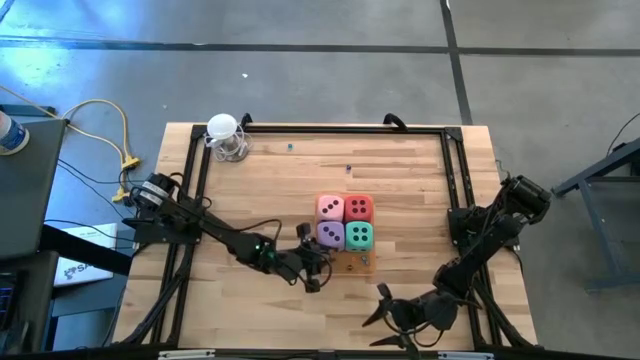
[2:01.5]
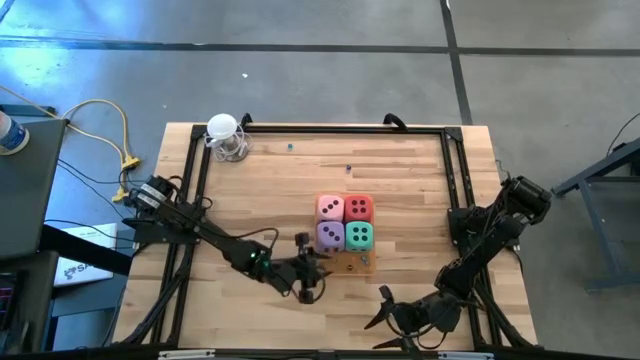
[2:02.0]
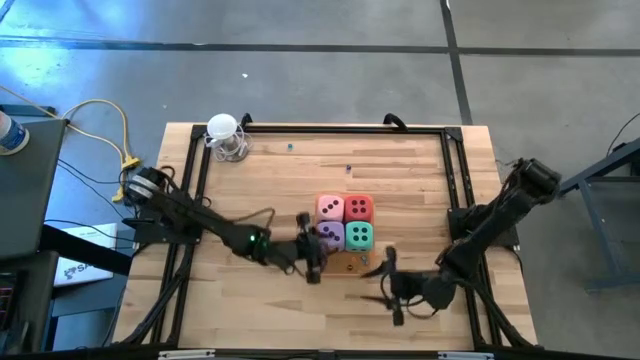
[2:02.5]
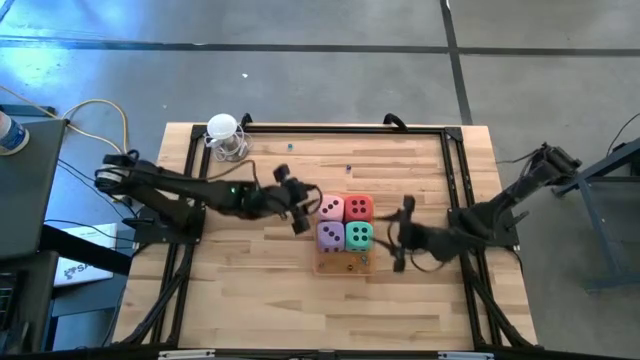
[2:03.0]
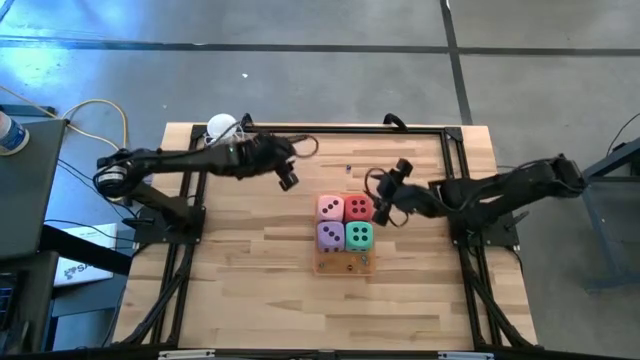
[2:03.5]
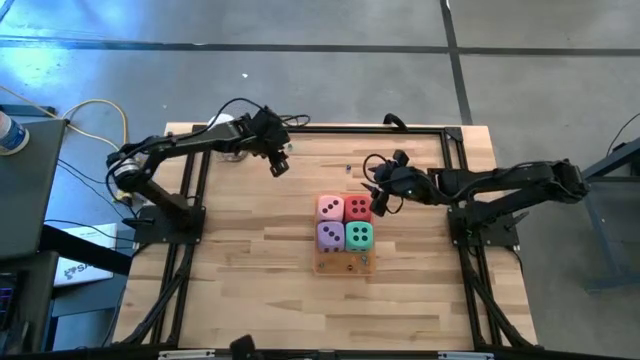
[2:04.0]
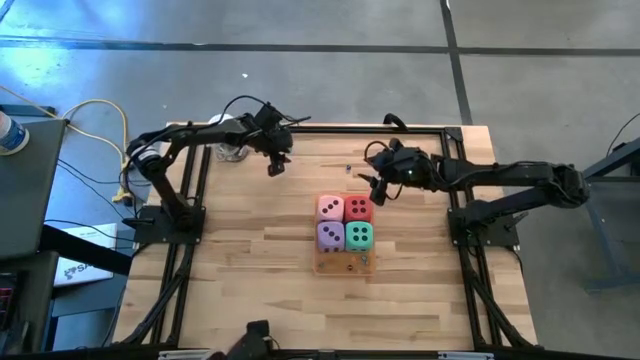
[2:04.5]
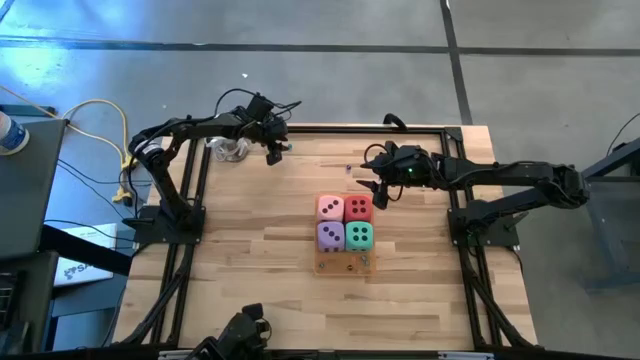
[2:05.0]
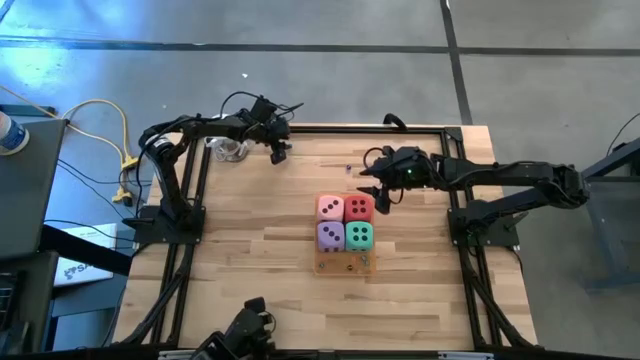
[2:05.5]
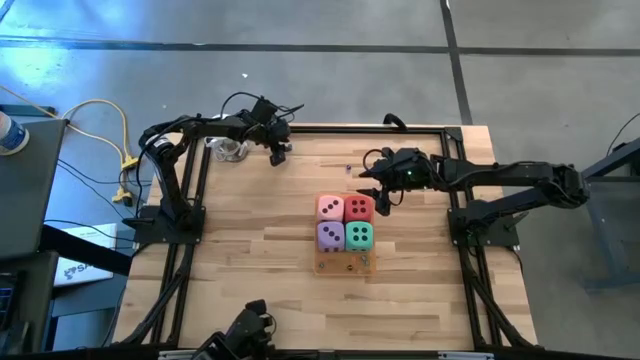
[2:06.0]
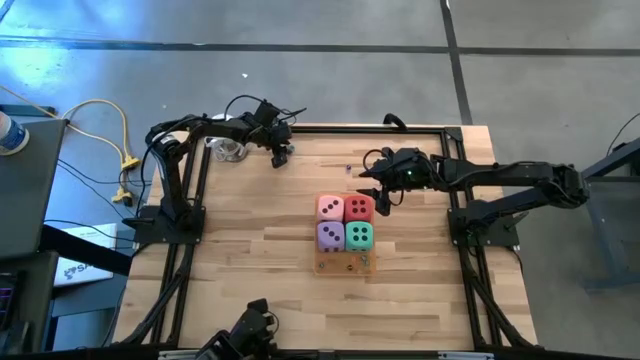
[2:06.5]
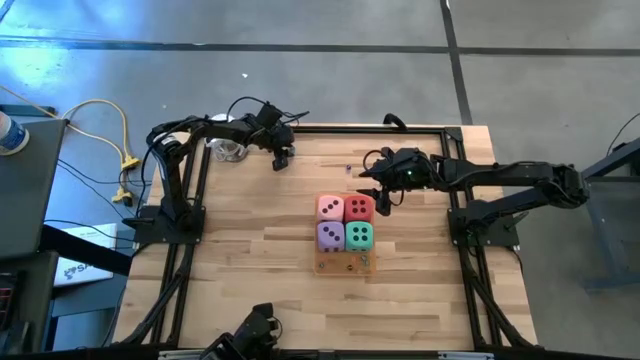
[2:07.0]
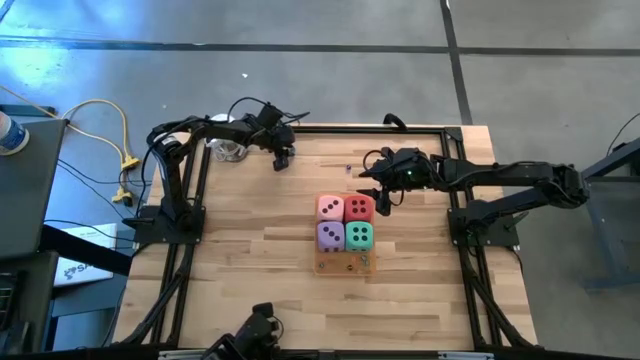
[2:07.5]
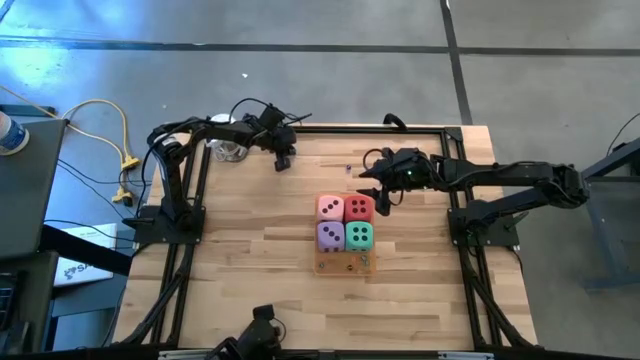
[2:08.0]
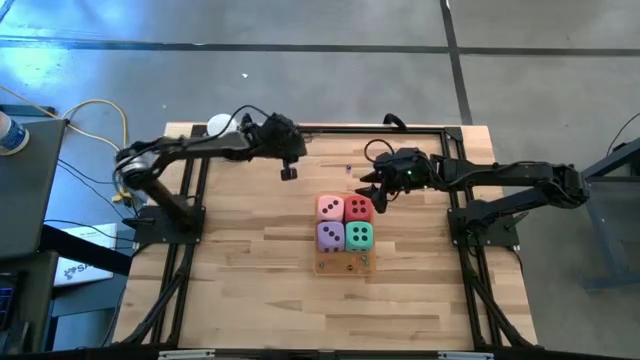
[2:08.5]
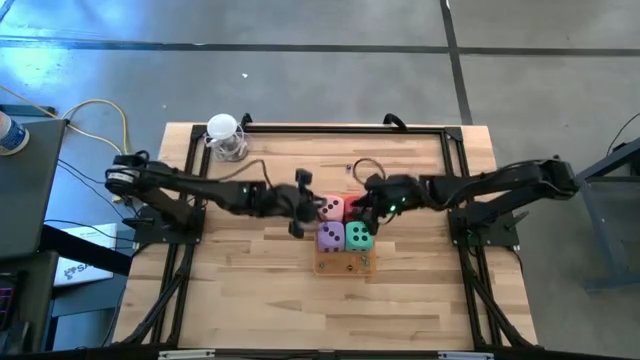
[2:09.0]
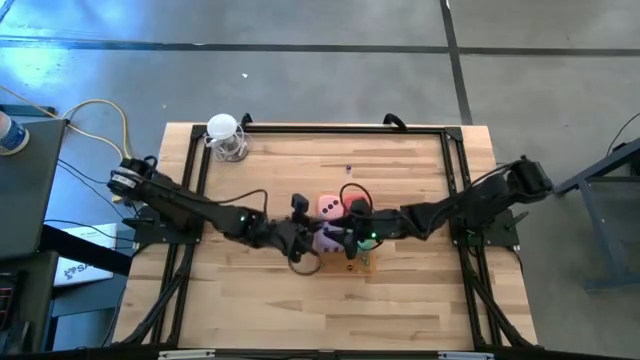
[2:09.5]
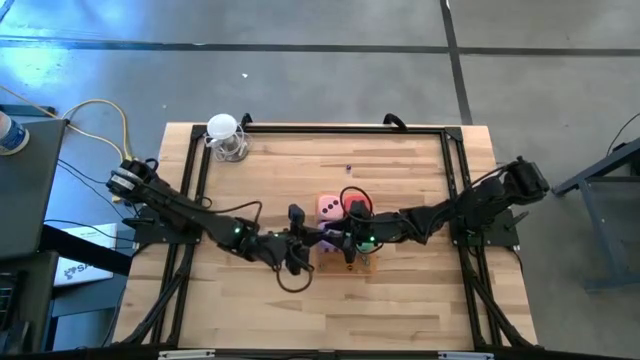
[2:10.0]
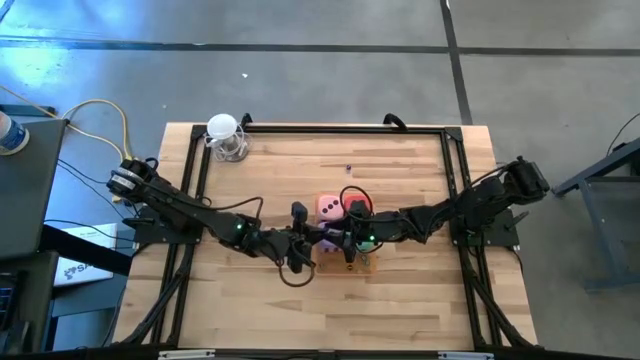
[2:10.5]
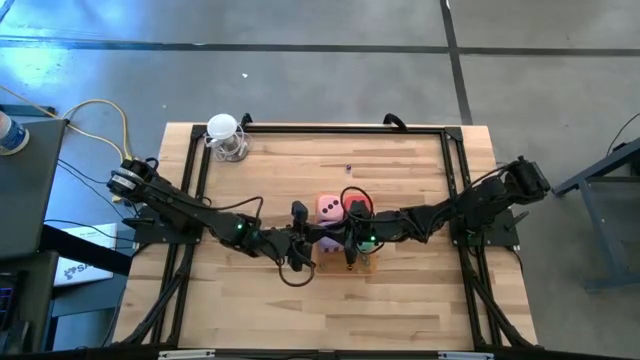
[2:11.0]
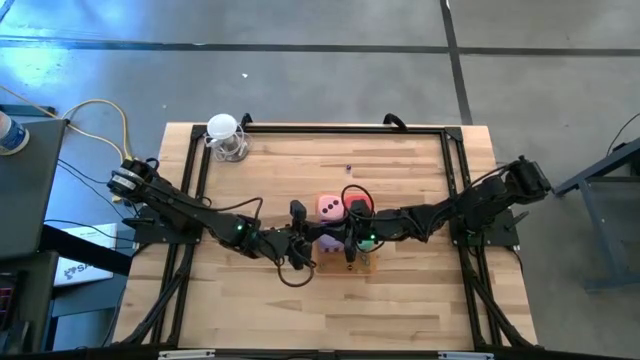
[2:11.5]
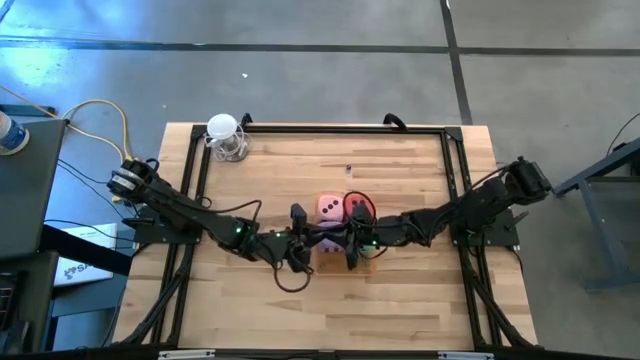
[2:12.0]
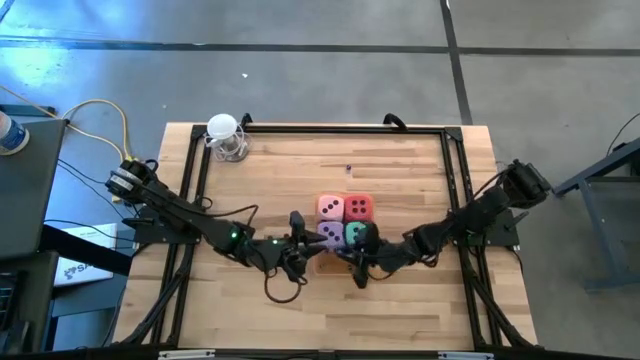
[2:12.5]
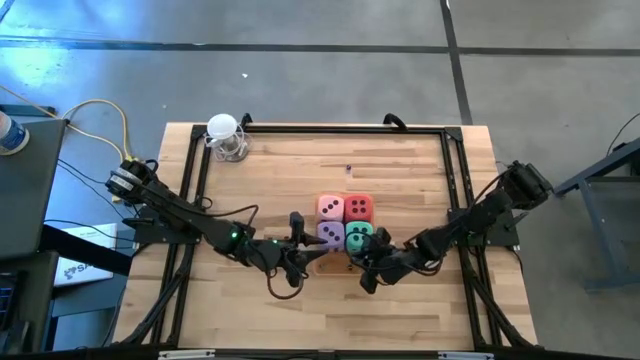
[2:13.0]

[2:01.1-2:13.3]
Task: Pick & Place Dice
Put the small blue die into the orange bin

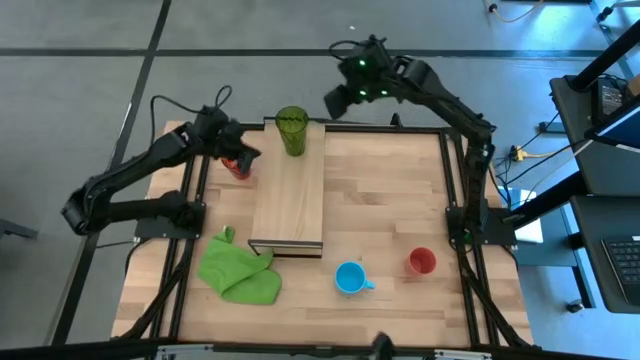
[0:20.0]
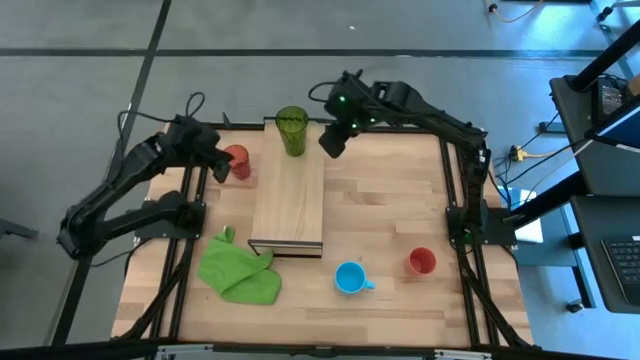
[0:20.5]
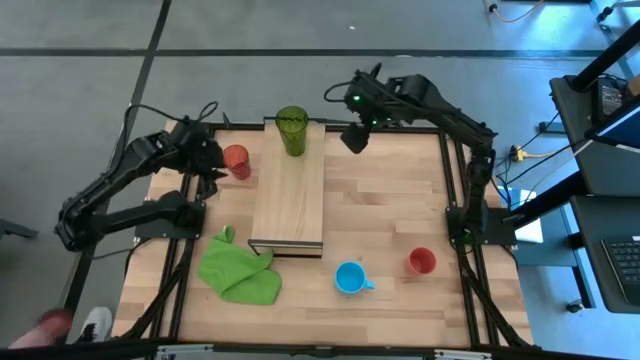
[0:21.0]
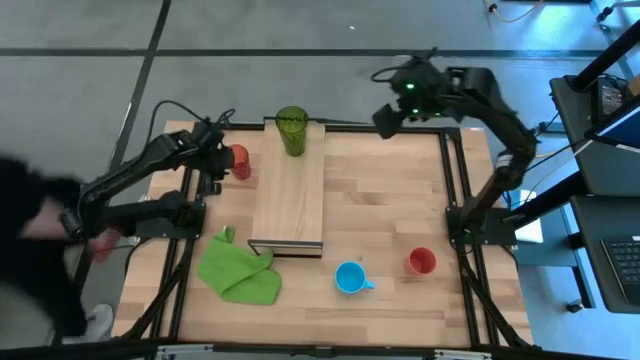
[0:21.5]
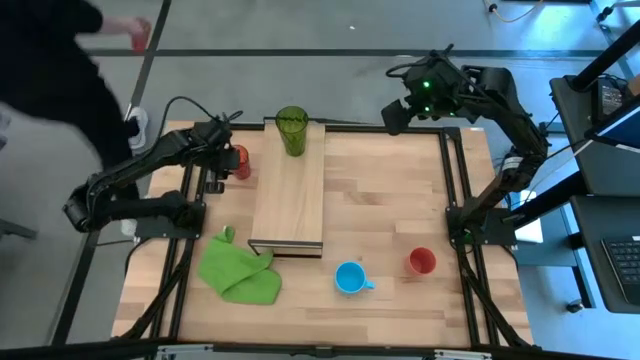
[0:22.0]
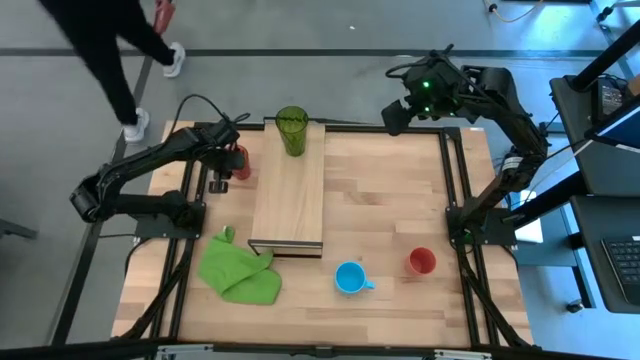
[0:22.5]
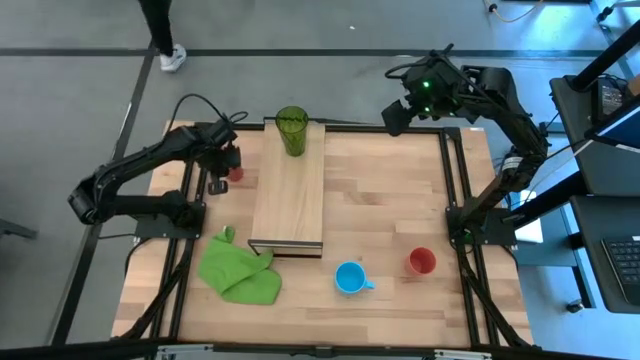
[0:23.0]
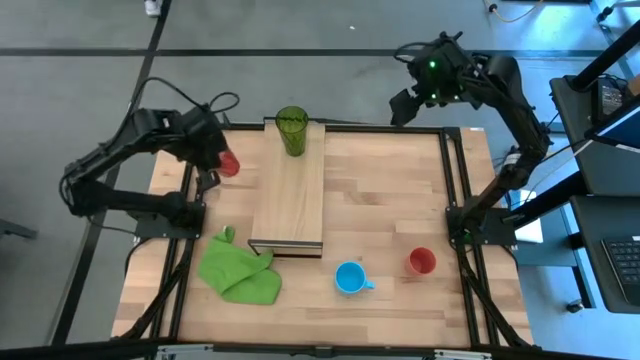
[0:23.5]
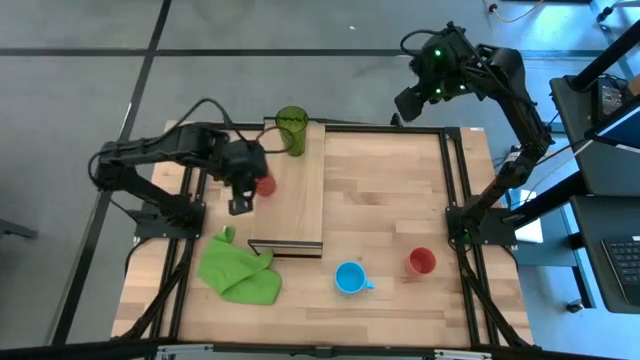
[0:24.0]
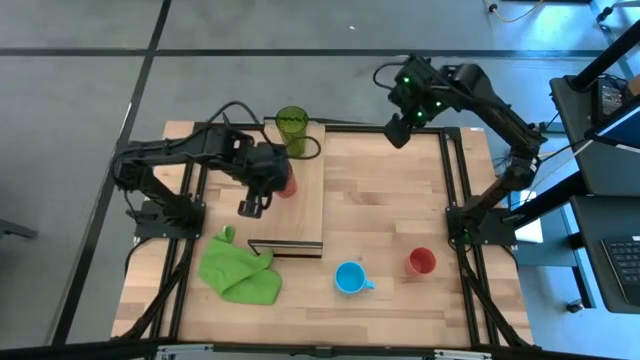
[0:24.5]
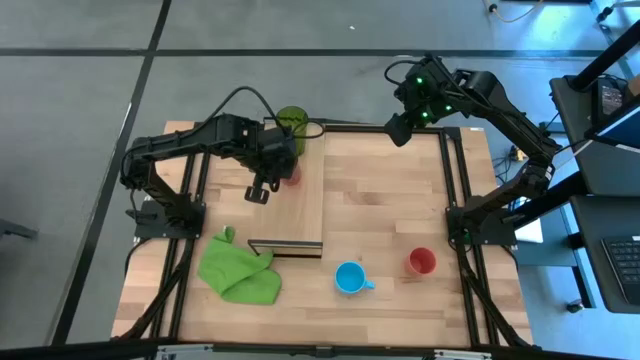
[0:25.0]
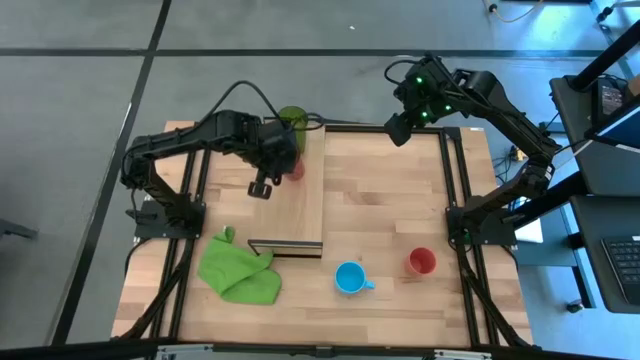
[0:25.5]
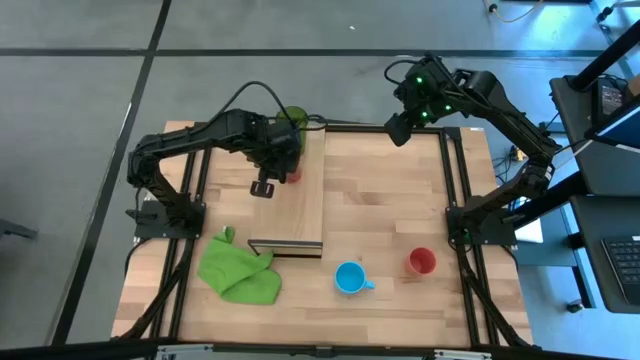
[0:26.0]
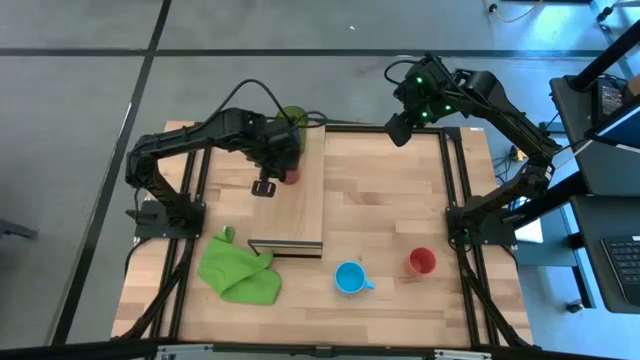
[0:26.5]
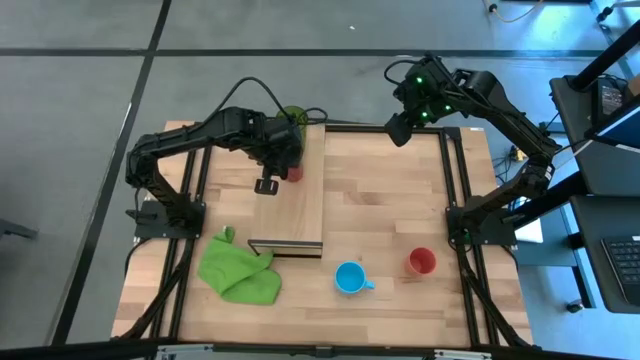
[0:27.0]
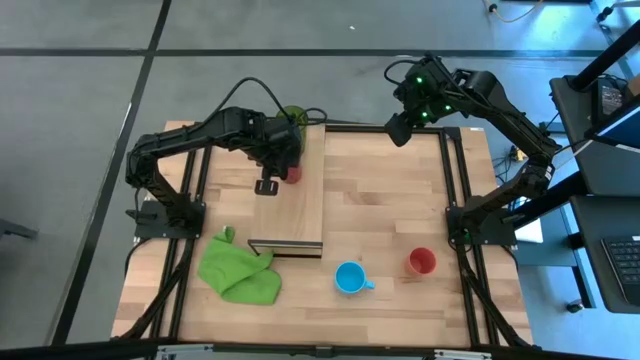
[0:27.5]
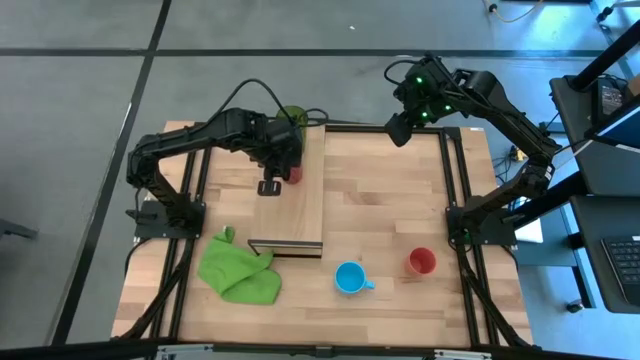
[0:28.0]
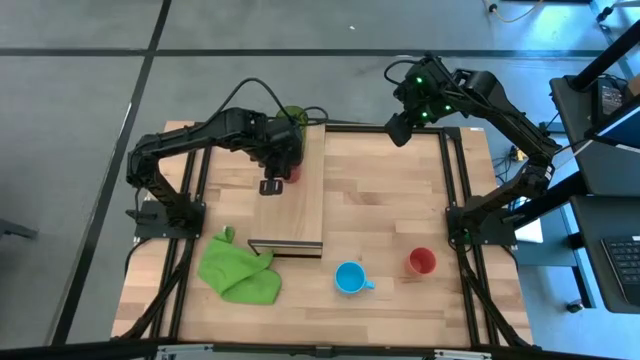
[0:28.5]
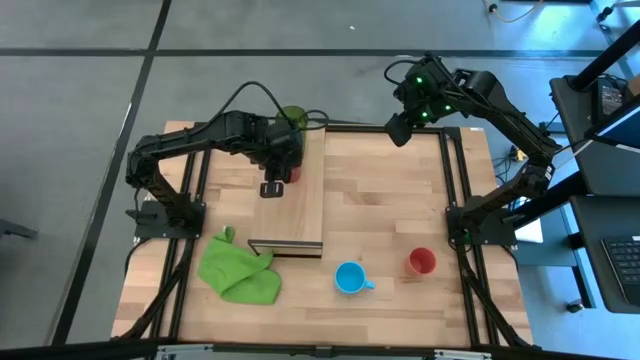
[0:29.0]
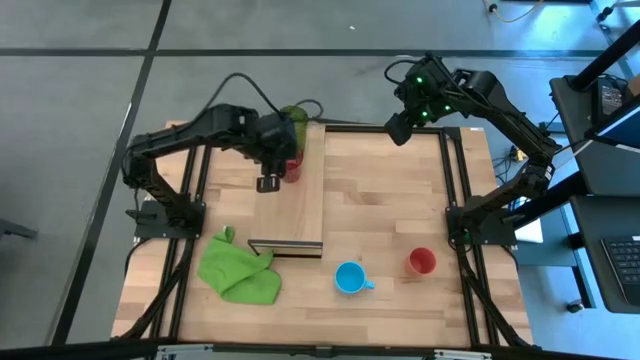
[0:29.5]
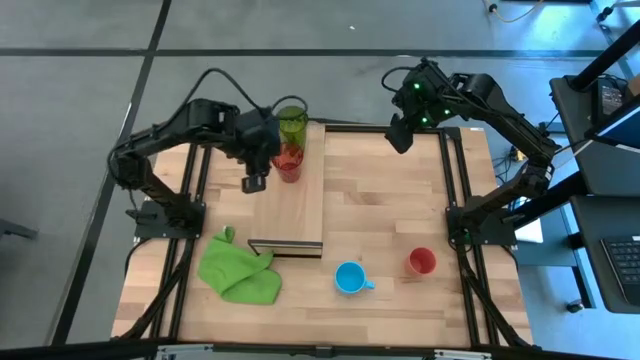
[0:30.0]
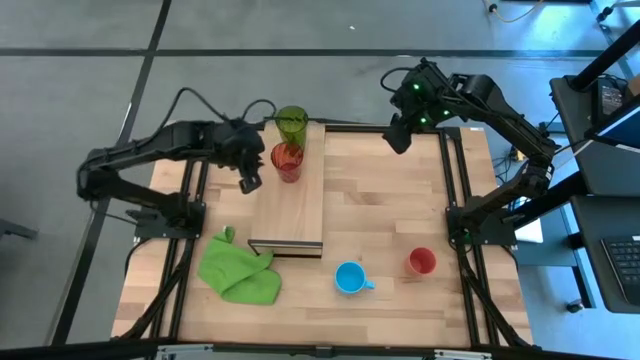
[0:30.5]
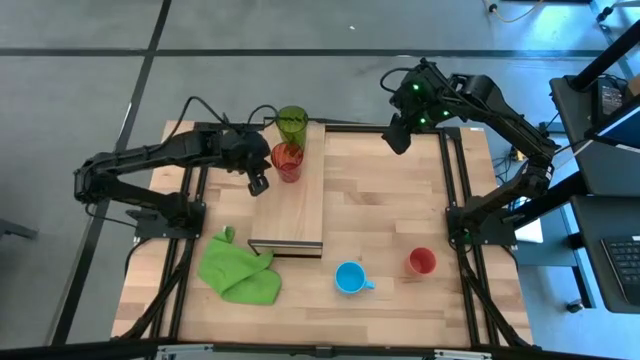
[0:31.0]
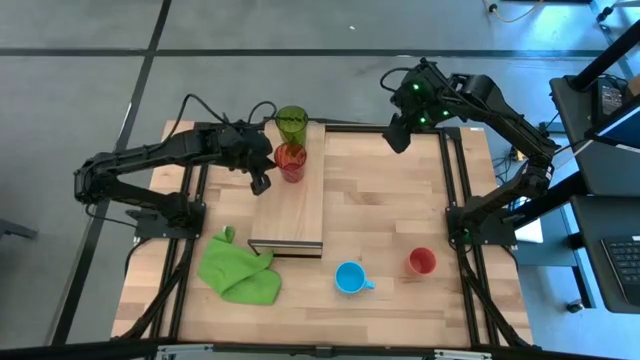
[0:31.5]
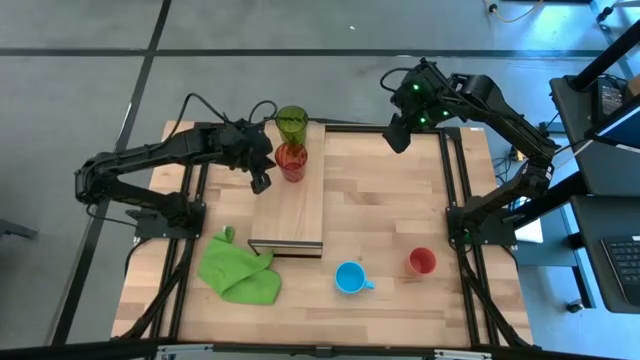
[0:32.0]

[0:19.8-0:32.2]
Task: Stack small to large cups/mugs on shelf
Put the red cup on the shelf
